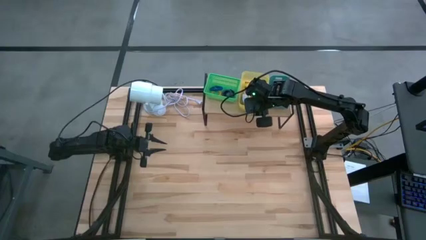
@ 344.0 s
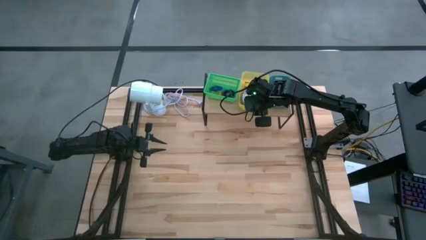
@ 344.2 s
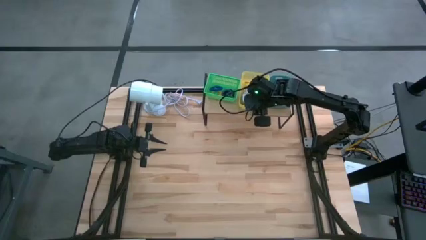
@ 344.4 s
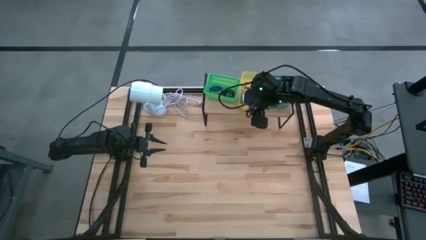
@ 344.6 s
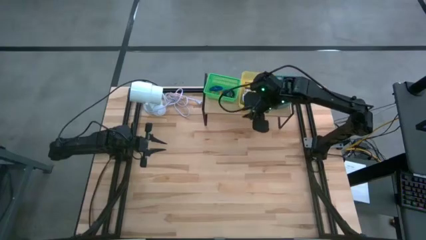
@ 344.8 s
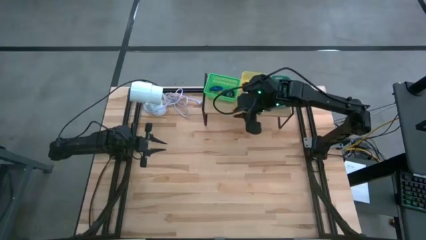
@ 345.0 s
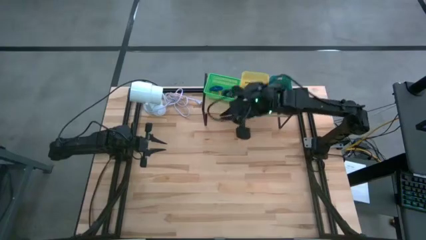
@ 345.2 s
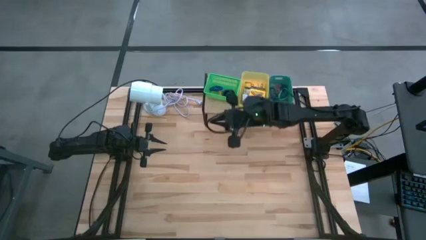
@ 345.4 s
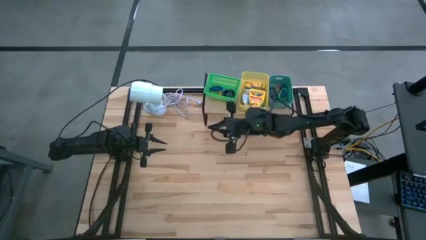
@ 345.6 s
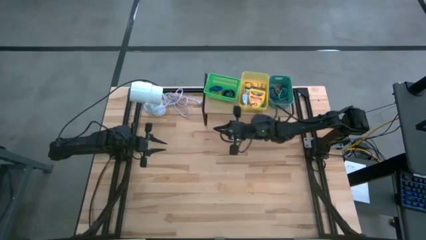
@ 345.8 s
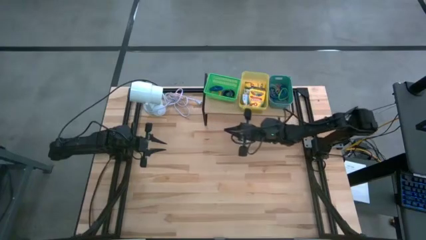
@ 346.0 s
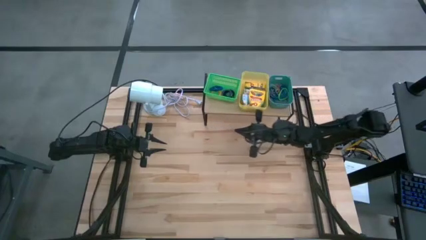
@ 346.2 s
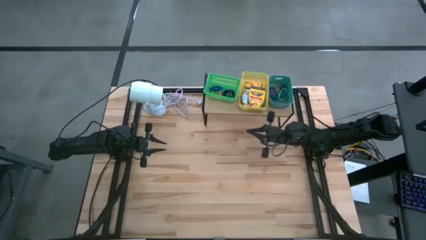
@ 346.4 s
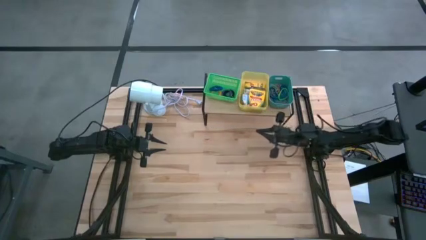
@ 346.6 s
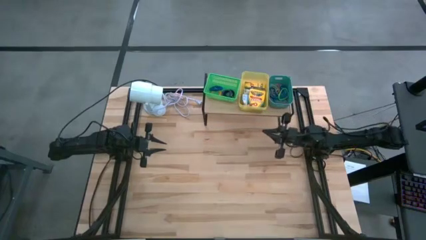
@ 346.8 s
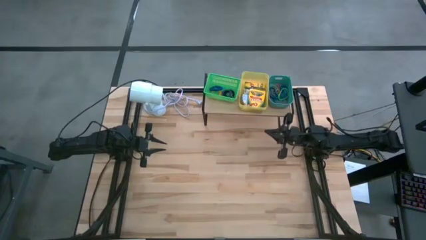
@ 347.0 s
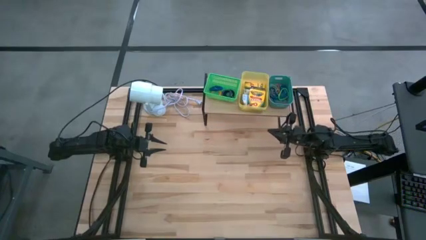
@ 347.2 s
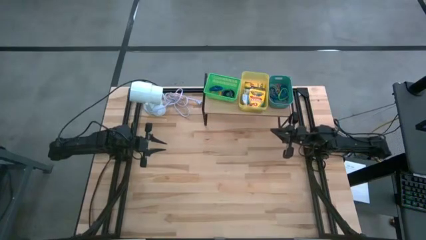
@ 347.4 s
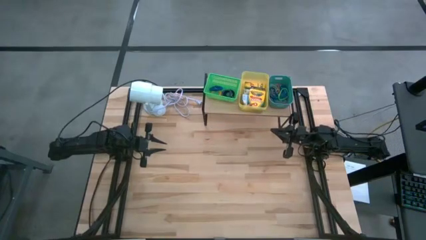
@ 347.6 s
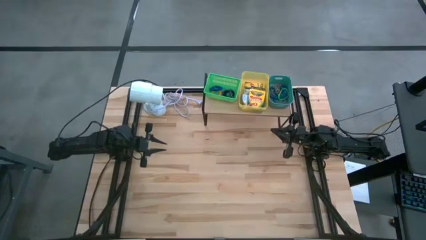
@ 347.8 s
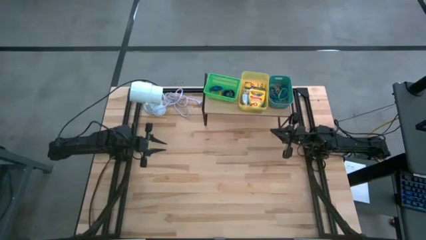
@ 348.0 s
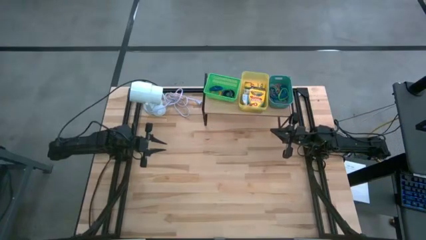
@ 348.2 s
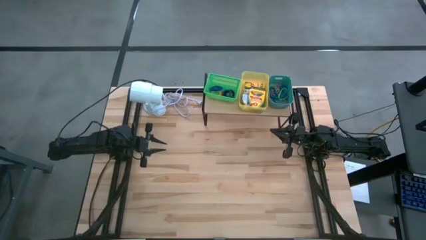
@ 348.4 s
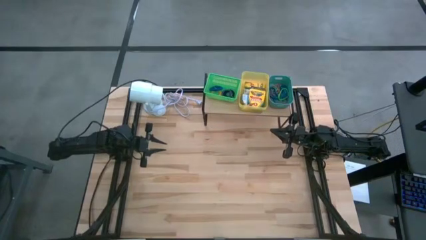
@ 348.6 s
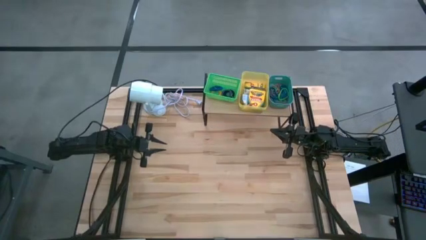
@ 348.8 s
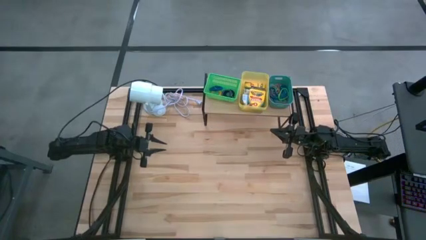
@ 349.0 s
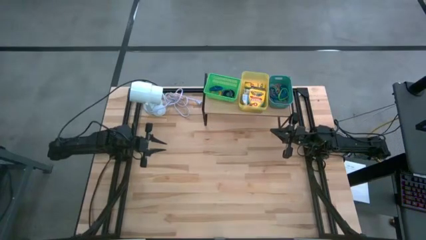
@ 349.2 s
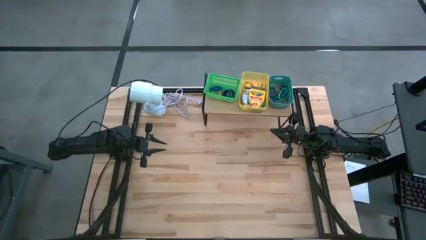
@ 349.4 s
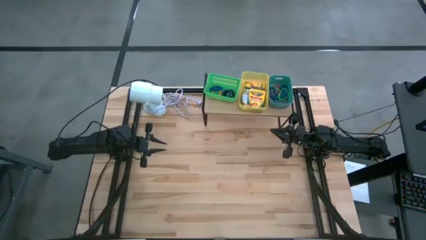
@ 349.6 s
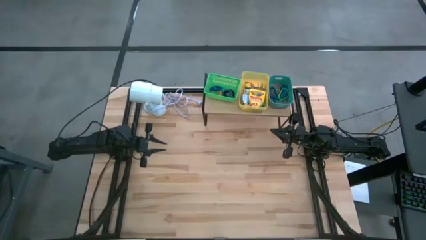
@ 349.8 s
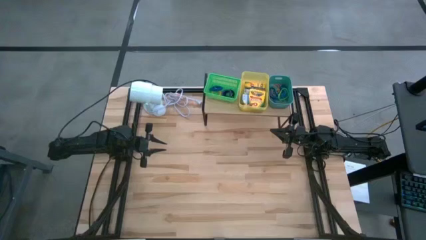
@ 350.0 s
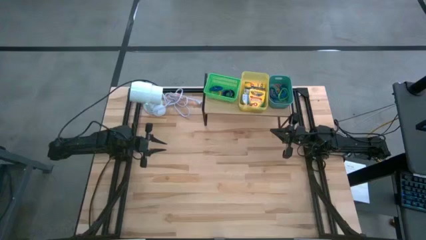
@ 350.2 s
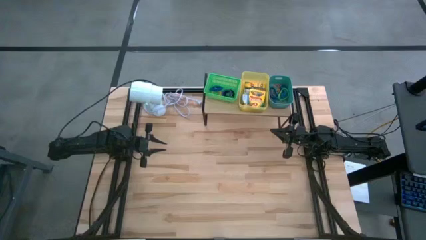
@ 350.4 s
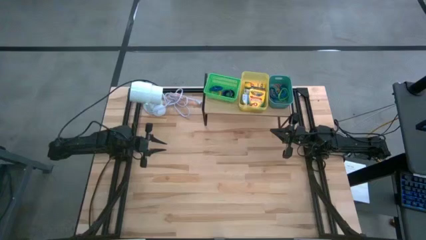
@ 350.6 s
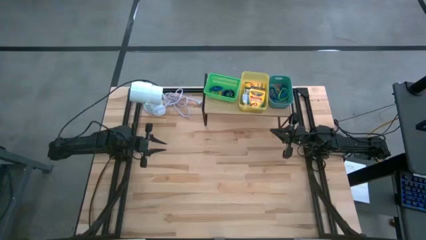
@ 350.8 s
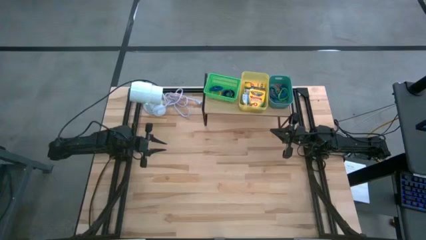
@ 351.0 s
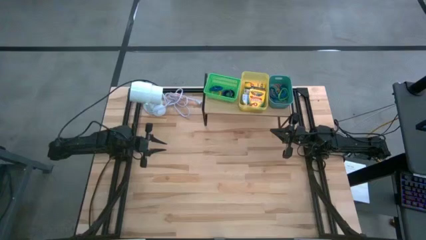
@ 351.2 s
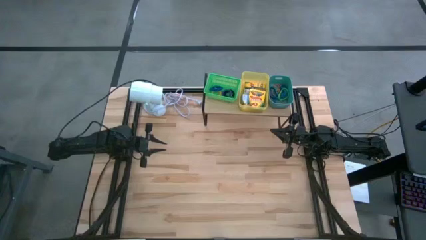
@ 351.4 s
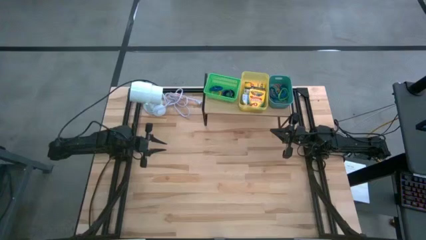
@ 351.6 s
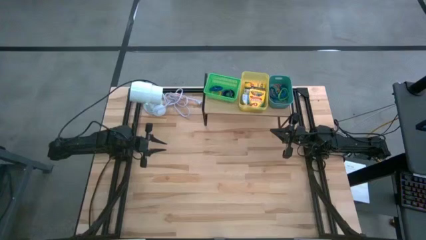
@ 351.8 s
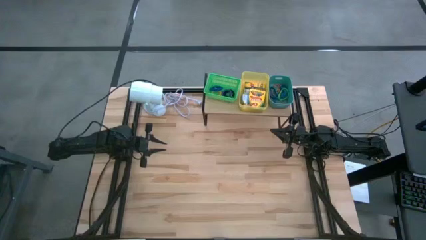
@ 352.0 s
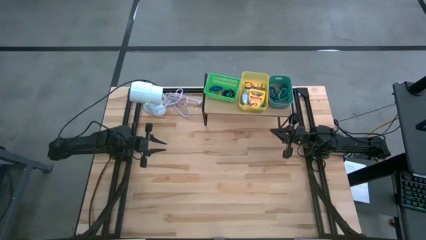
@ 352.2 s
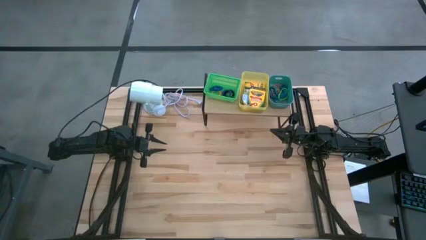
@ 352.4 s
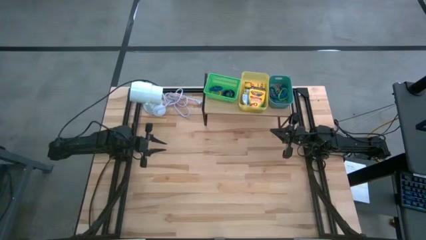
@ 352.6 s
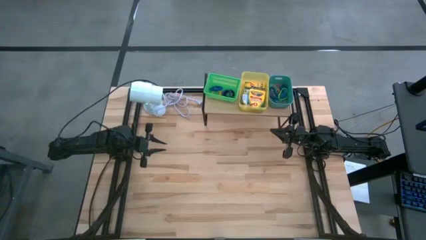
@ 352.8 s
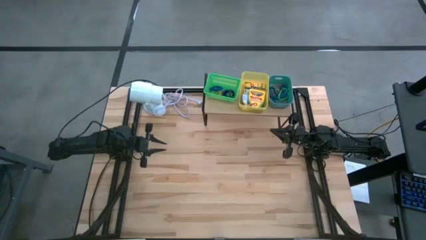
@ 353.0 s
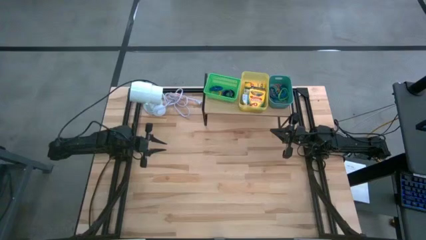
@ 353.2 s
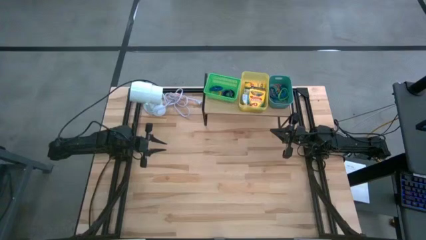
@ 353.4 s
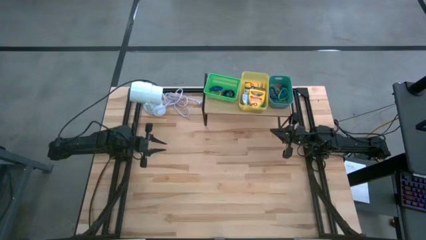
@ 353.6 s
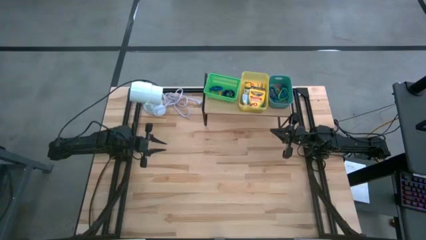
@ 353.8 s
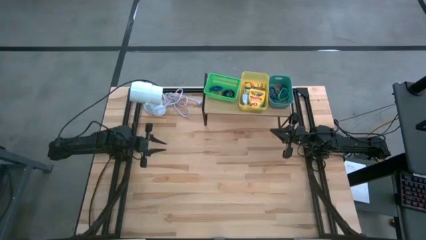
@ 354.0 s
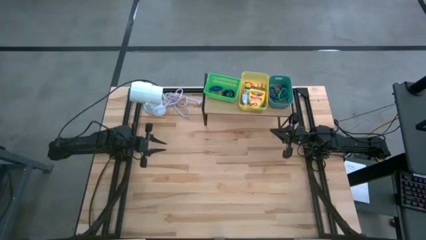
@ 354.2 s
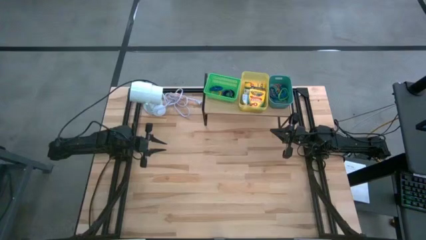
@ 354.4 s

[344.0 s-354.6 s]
Task: Pick & Place Office Desk Supplies
Return to Home Position
